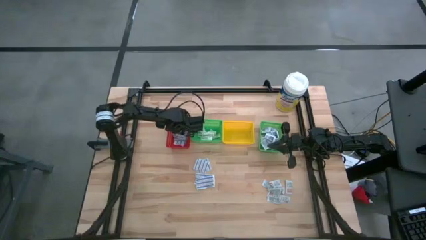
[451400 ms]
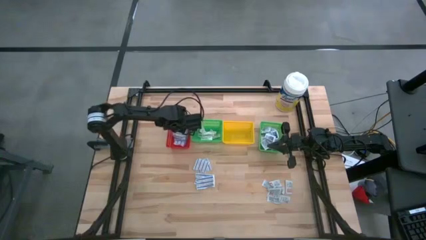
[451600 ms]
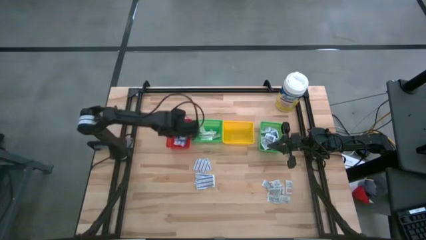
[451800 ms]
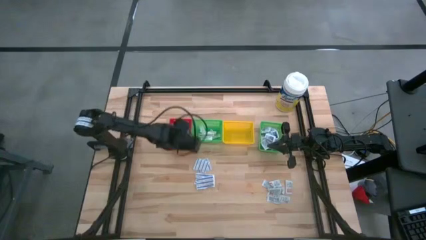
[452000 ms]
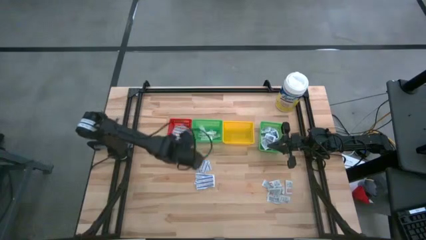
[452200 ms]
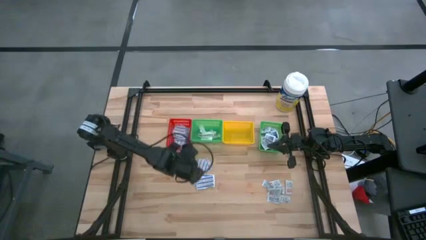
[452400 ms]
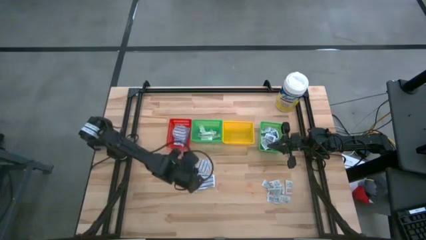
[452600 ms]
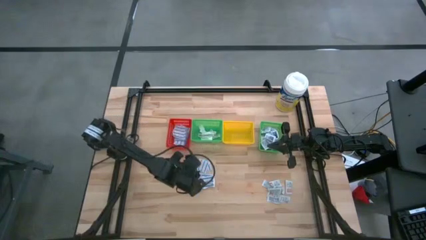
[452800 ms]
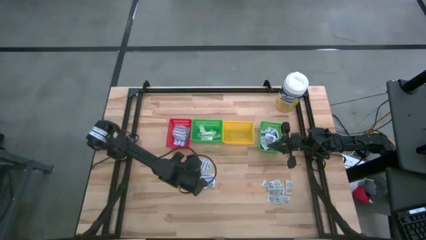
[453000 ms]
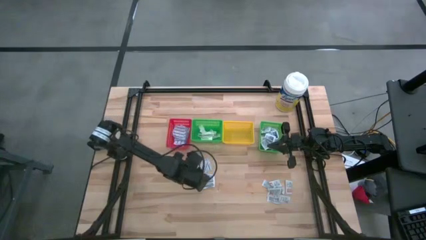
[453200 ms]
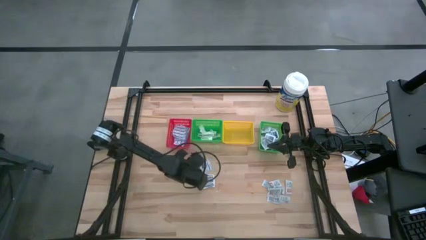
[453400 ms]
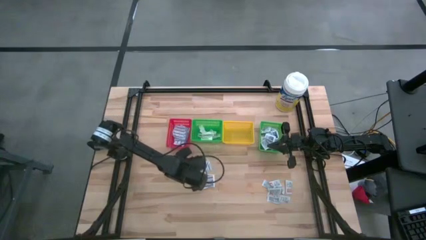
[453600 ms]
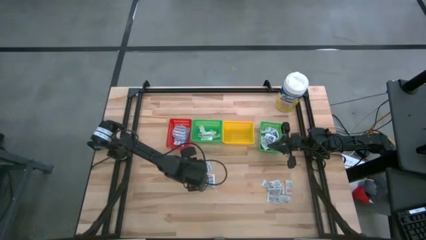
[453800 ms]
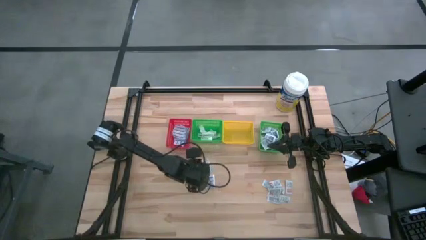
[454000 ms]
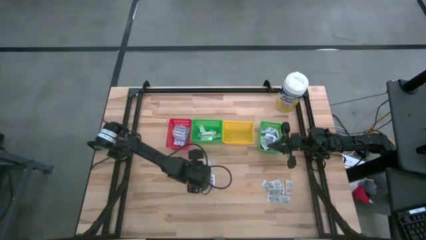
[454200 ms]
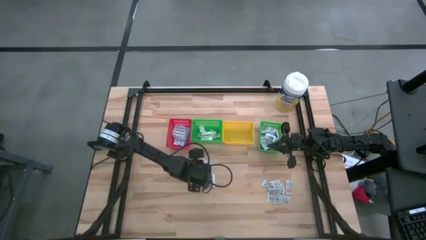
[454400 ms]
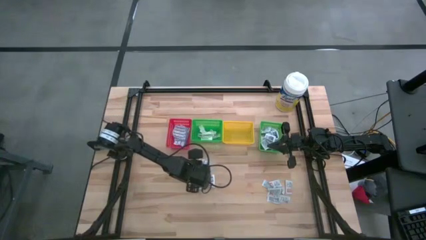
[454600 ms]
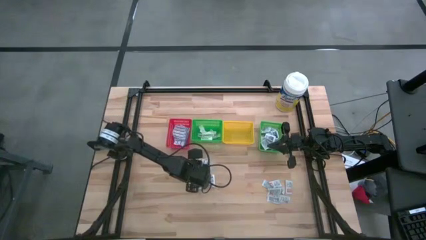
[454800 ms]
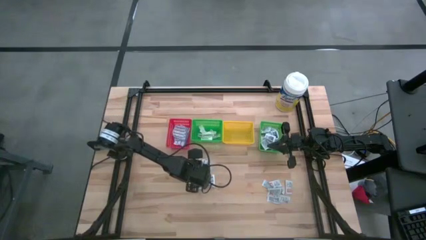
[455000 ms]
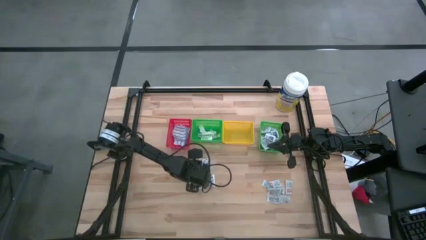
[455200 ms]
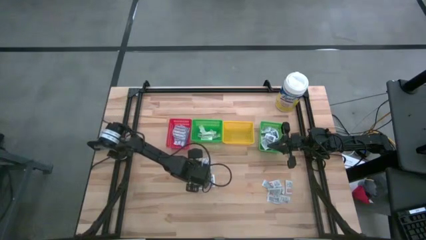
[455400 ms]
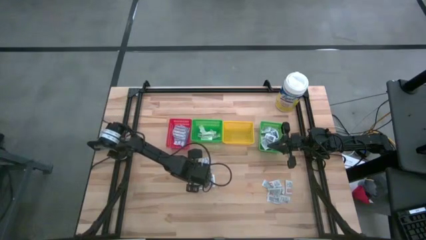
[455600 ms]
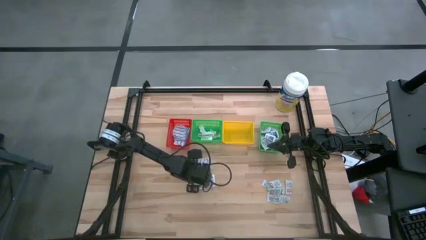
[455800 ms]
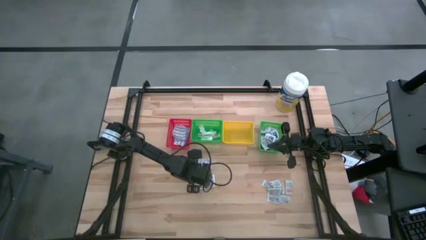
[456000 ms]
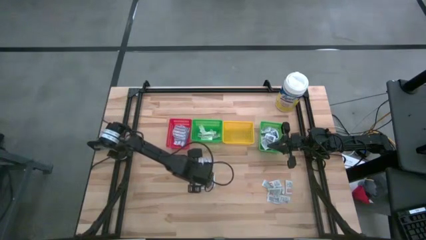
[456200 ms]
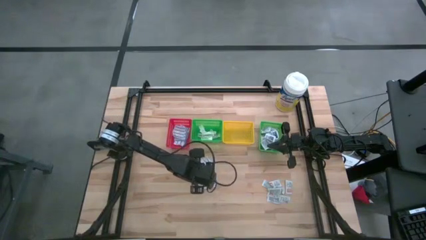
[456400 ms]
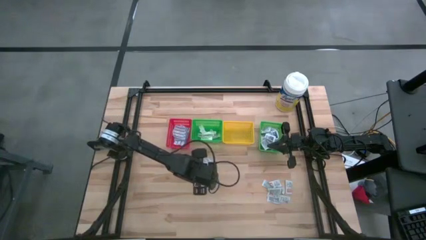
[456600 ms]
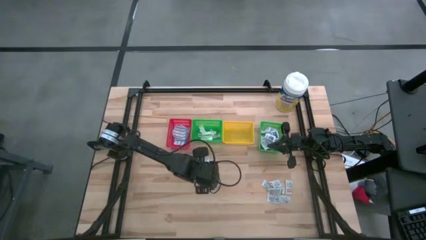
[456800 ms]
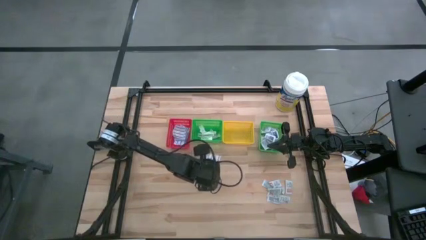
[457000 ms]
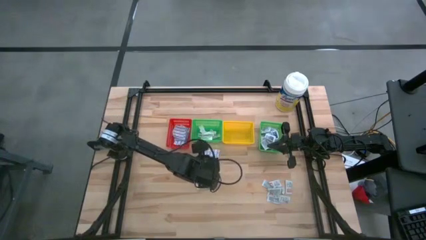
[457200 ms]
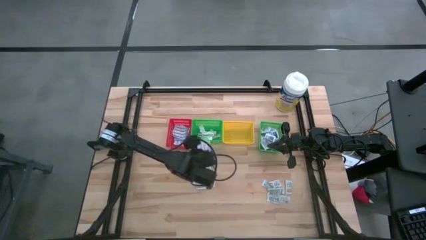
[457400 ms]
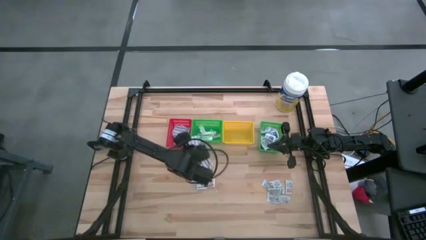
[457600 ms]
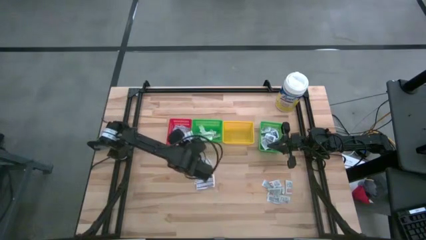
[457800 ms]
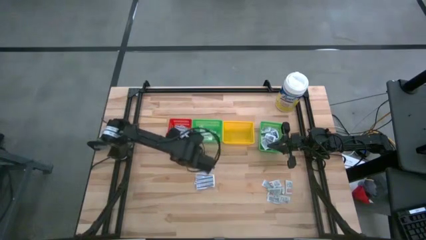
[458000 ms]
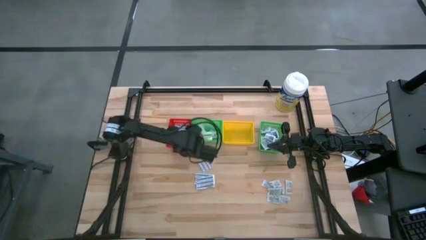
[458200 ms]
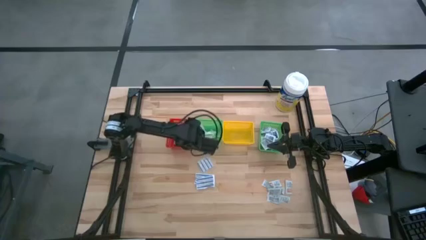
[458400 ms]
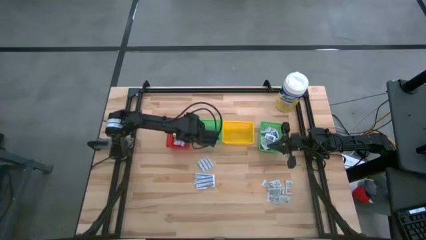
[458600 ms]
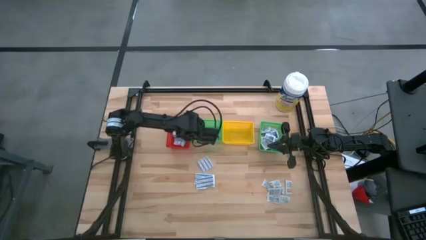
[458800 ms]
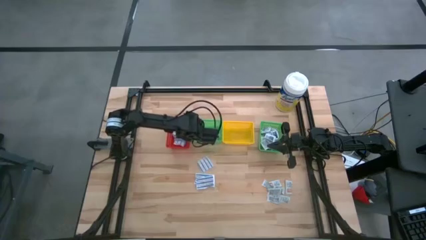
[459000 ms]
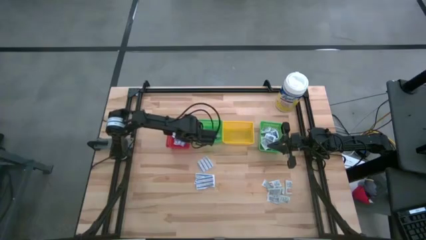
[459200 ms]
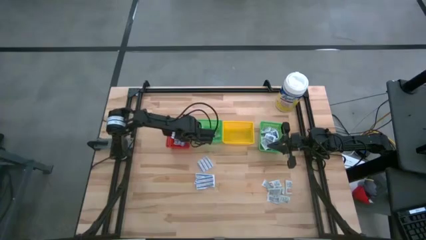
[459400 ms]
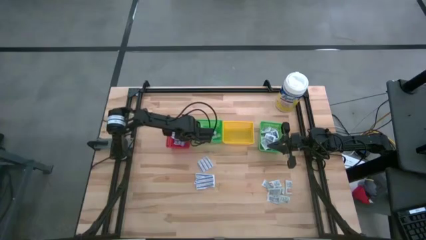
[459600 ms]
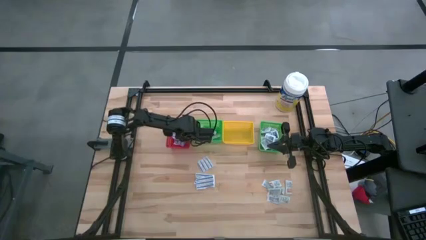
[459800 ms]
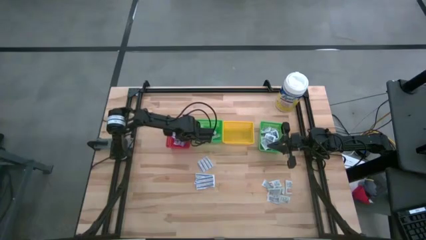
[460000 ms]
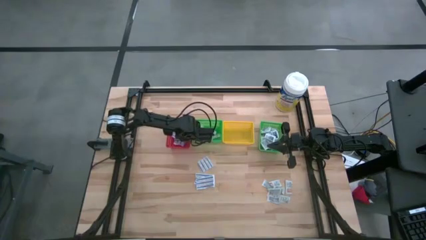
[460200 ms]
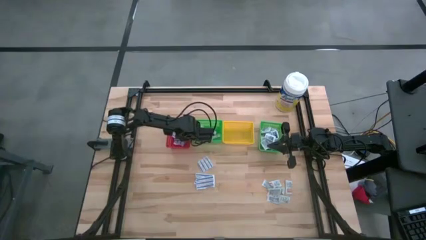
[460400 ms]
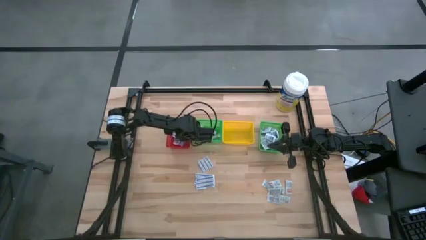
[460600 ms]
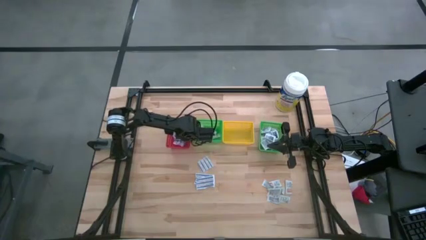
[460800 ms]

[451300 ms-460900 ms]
Task: Pick & Place First Aid Supplies
Put the blue bandage into the red bin

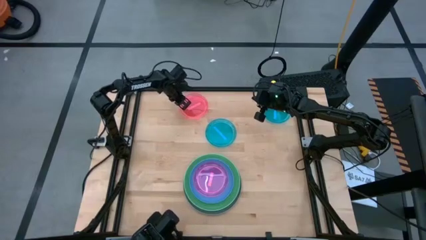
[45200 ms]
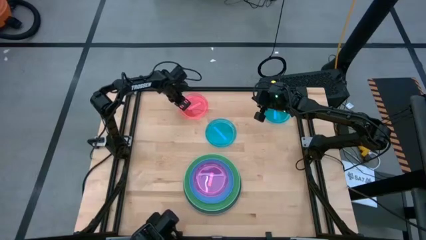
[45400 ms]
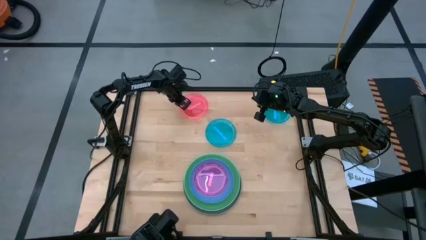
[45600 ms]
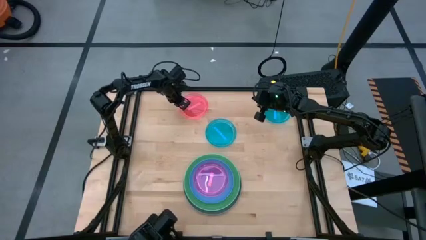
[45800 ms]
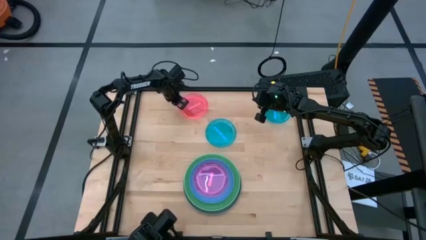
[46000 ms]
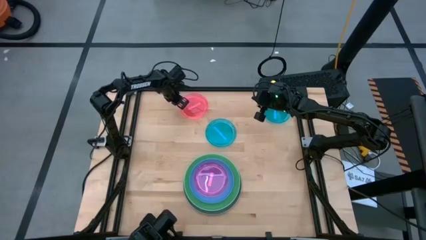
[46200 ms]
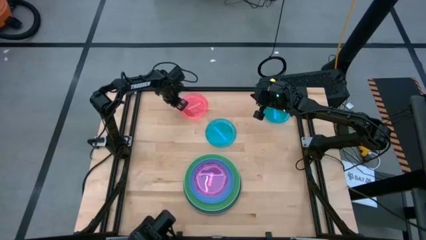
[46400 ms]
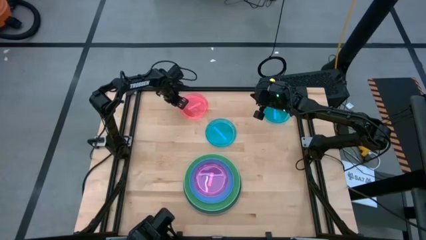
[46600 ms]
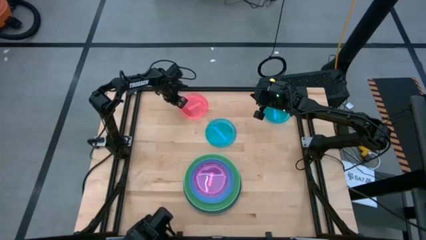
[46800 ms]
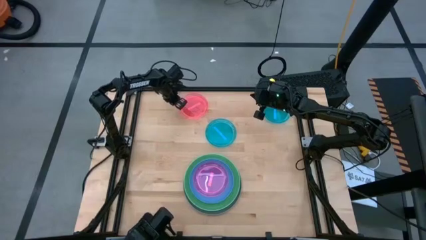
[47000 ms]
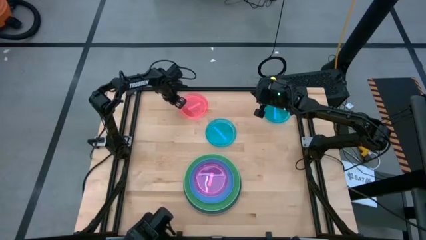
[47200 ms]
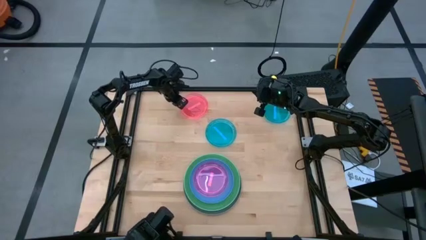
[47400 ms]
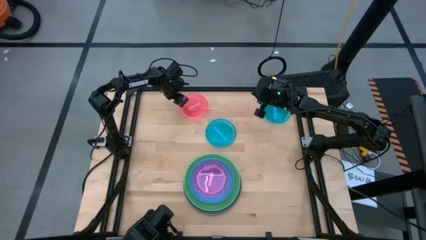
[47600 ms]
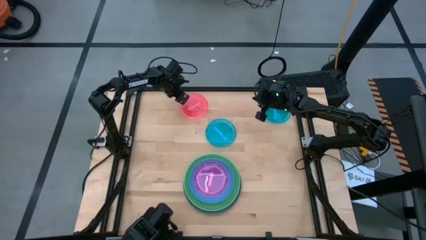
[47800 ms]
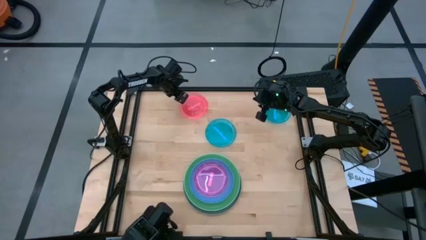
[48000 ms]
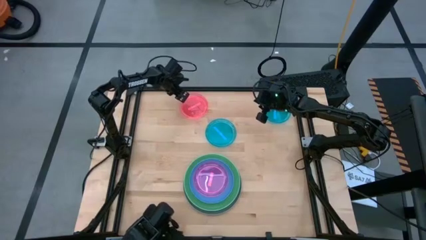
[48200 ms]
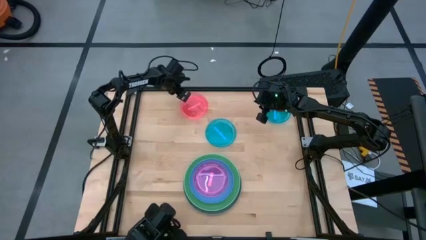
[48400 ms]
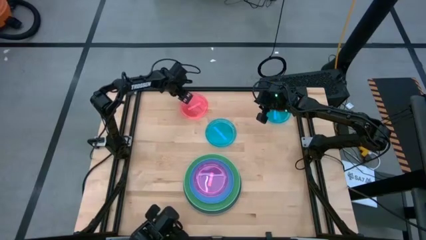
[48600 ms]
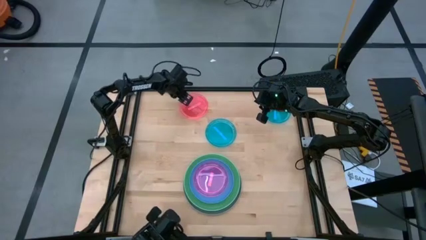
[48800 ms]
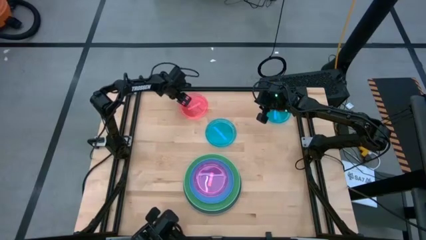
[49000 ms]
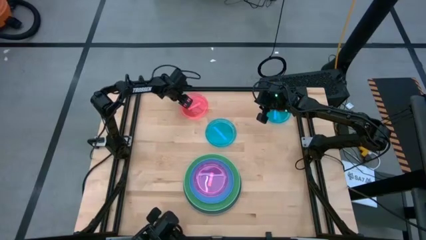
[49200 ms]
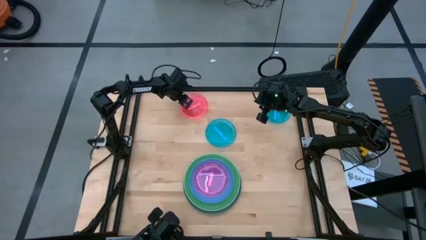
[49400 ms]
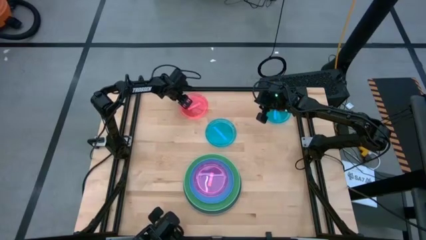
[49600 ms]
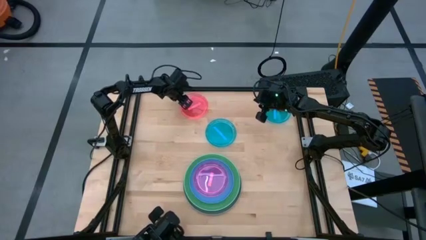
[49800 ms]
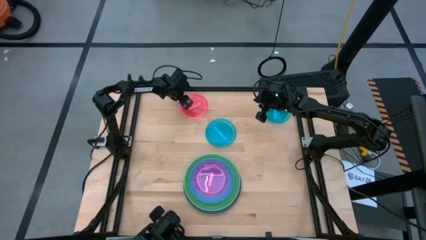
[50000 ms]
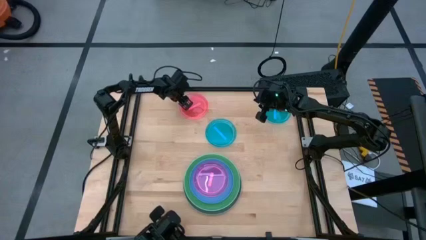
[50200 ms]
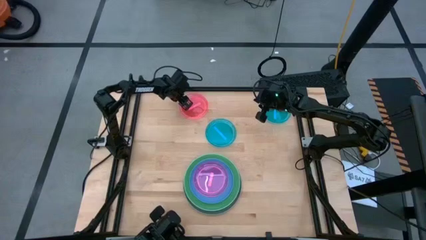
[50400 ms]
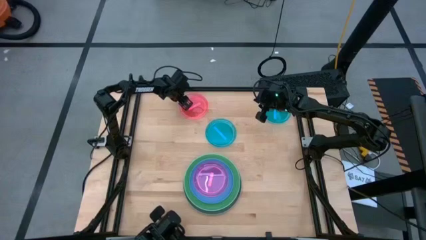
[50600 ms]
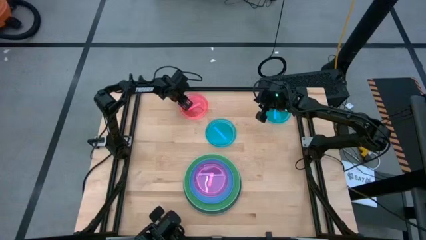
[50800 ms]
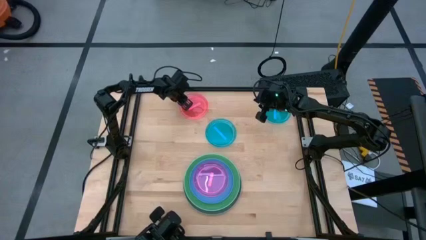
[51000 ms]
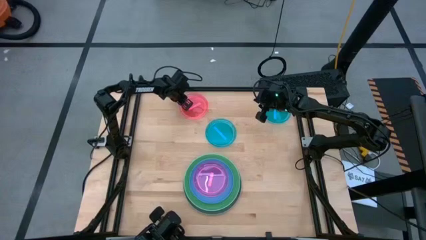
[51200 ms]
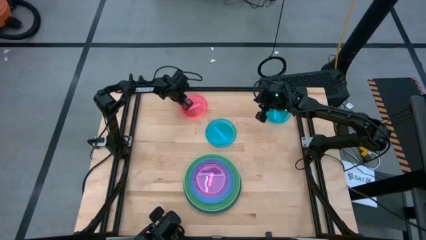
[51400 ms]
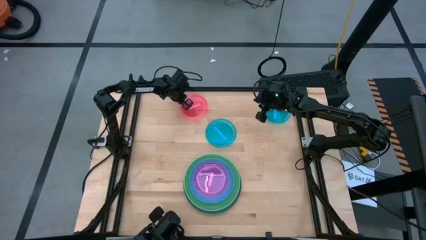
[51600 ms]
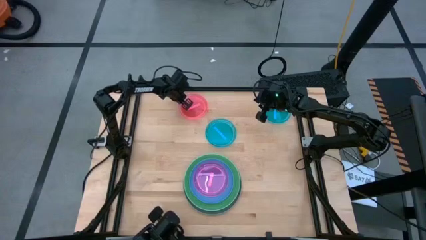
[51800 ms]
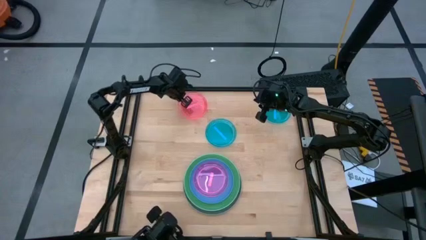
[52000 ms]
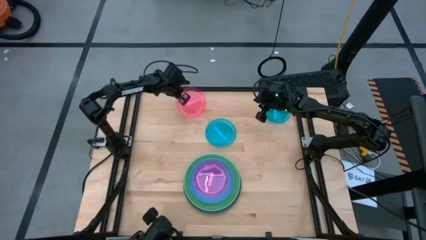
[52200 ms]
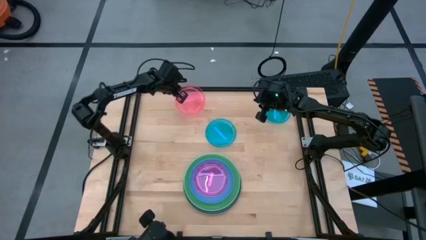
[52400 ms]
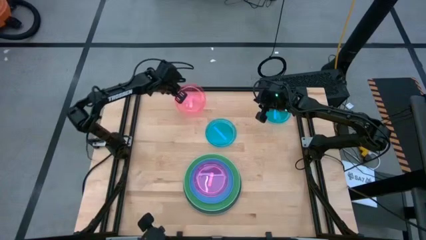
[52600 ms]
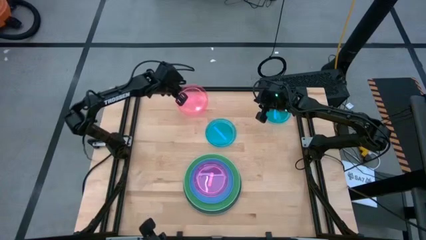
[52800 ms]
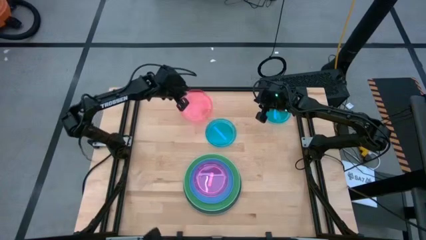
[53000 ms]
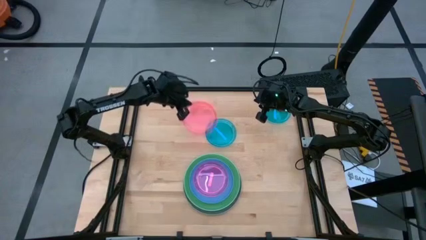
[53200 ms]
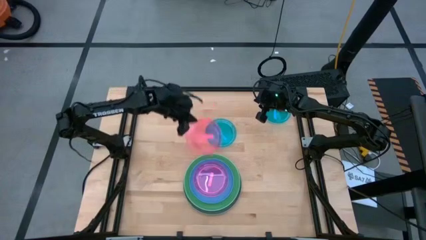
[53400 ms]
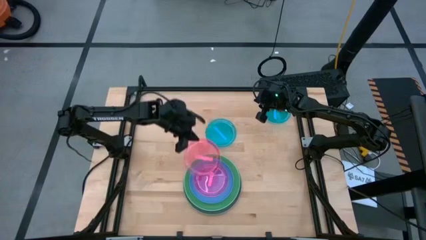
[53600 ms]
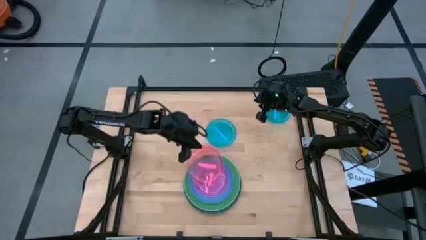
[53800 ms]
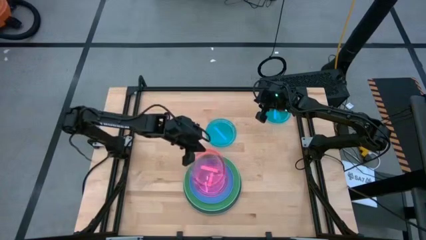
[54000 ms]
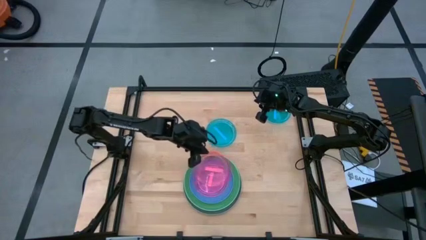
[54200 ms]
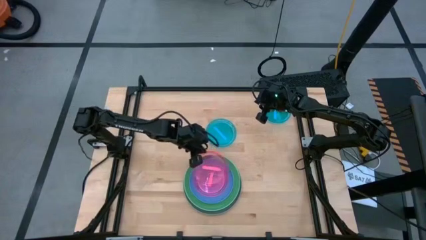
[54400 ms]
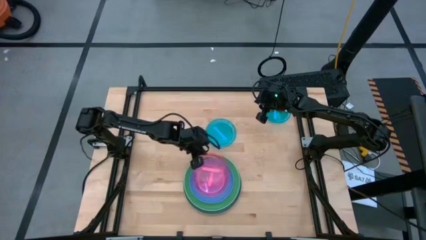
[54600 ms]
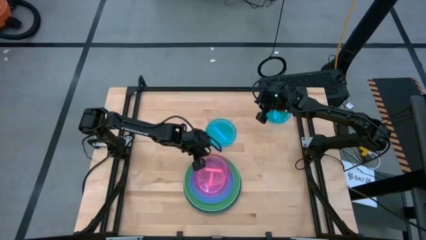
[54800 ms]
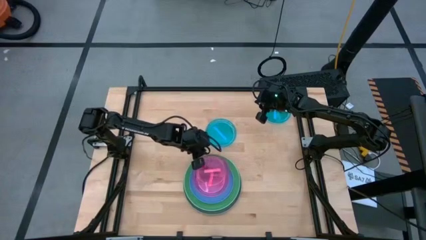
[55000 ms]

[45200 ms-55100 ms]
Task: Stack plastic plates
Stack the small pink plate on top of the bottom small pink plate
